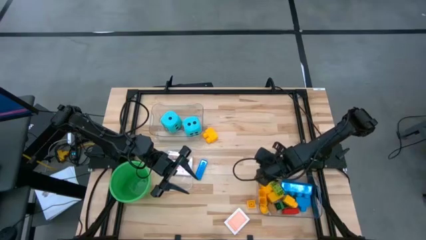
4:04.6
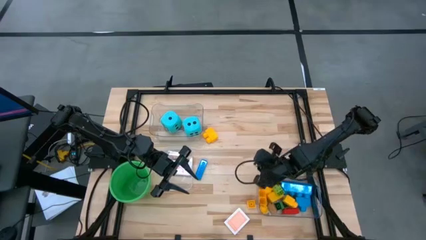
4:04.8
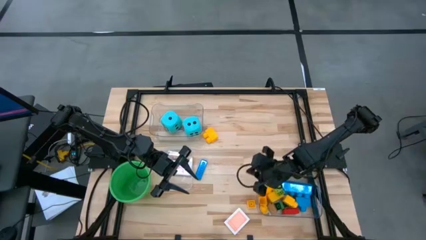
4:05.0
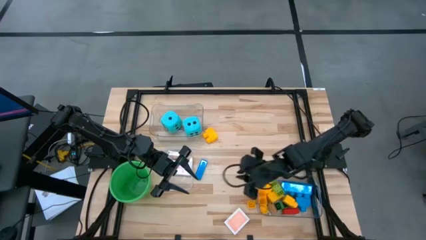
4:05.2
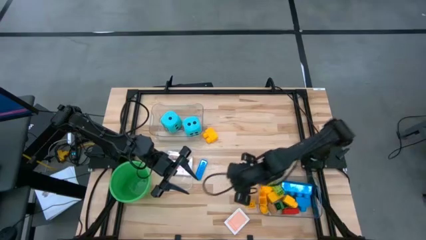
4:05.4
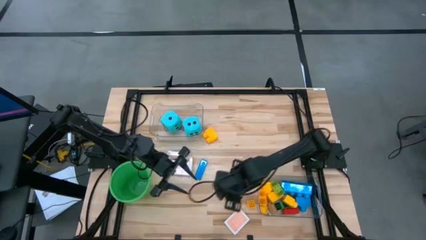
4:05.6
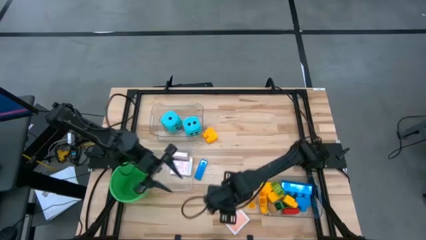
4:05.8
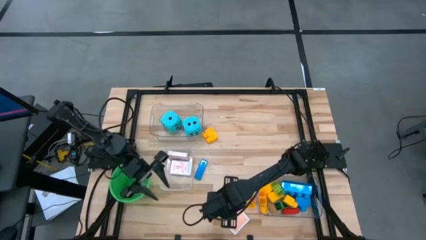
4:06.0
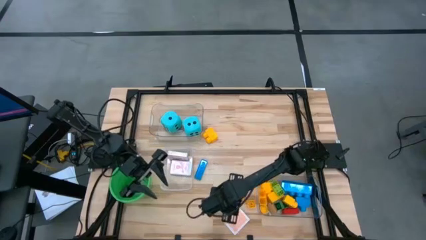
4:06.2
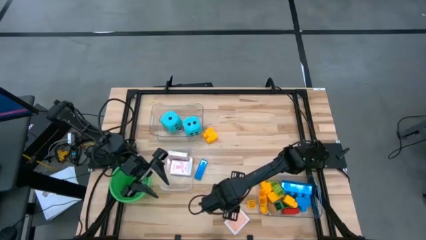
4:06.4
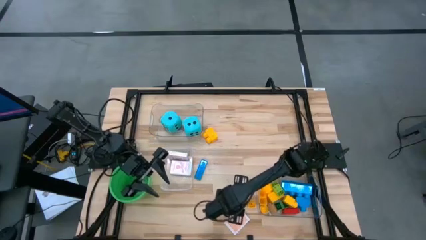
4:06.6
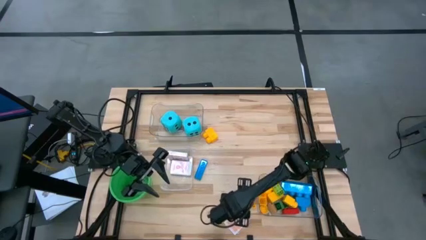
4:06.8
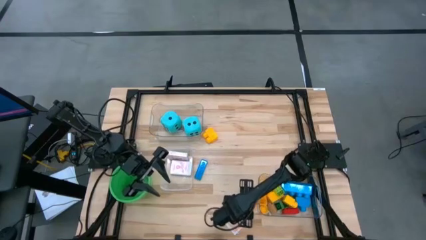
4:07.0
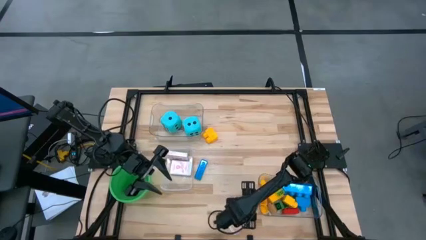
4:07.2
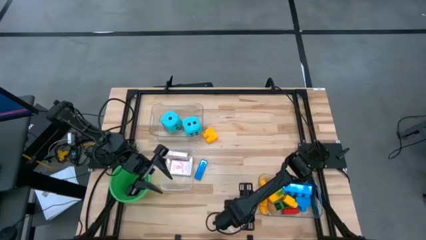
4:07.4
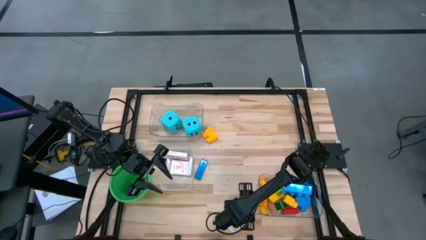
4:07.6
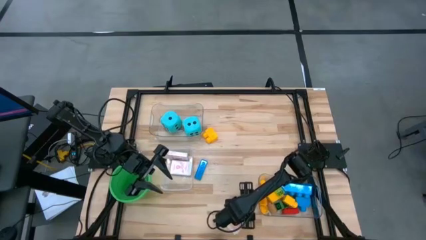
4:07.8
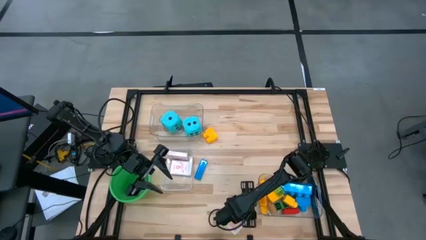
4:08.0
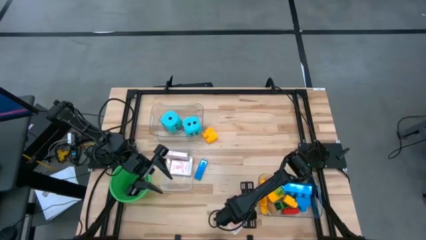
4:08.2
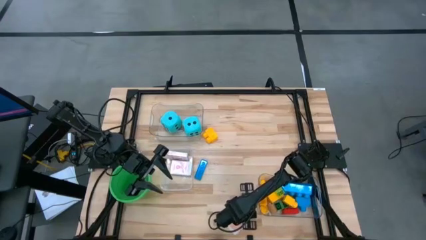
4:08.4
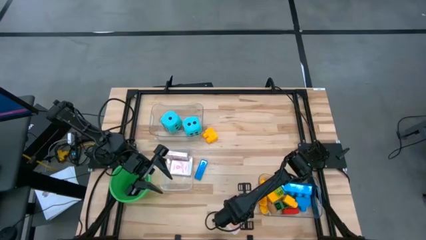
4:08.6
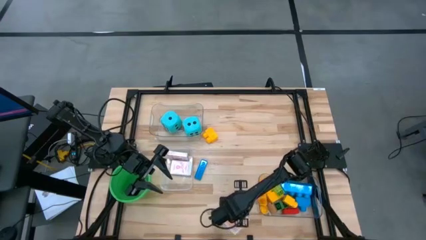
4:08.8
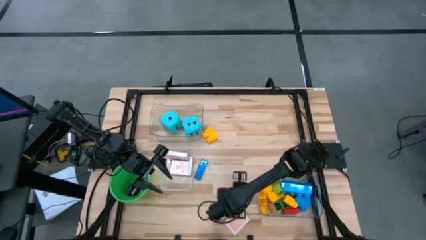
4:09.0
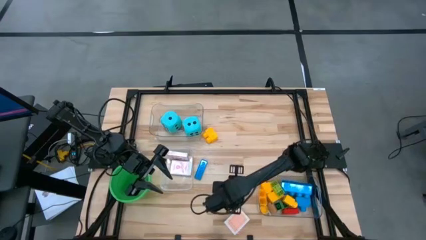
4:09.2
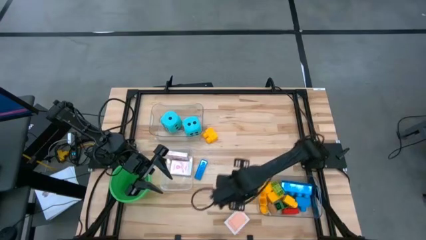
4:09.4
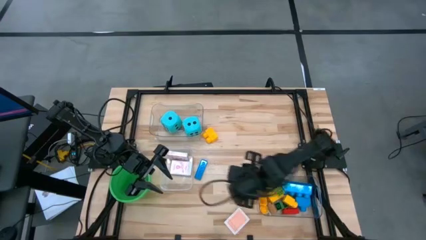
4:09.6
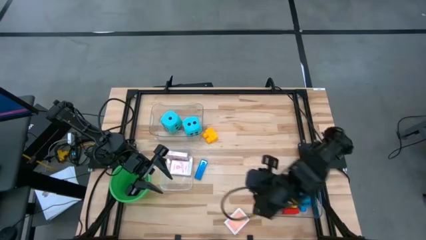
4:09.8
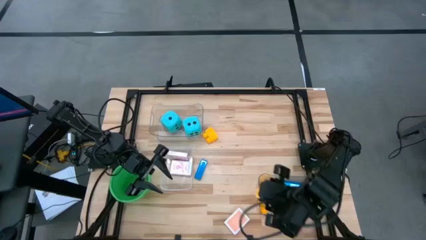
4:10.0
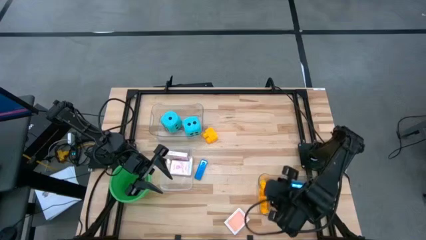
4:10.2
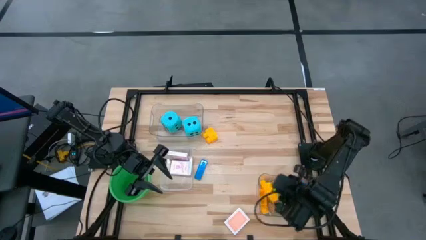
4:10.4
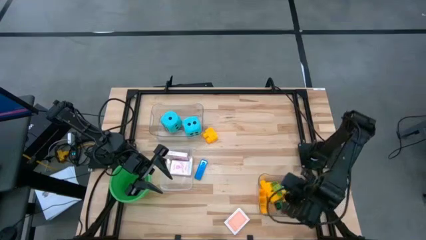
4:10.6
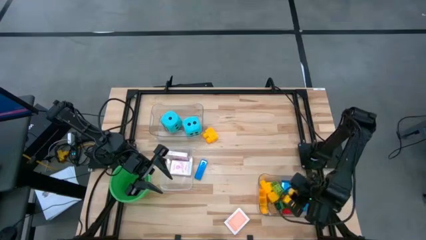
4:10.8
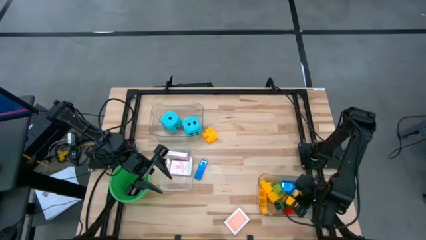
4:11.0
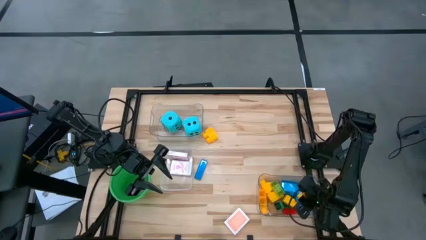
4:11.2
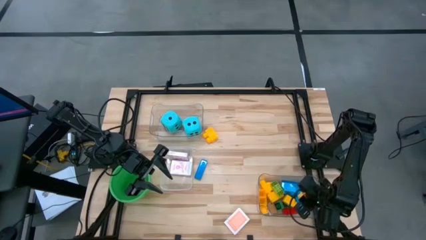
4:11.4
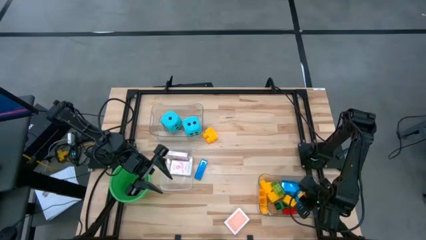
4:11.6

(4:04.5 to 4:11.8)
Task: Pick & Place Toys
Put the yellow game piece into the bottom right transparent bin

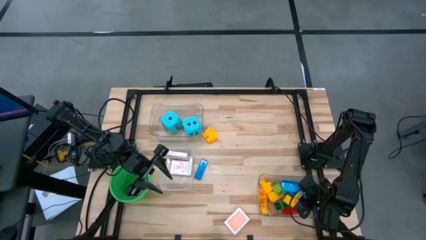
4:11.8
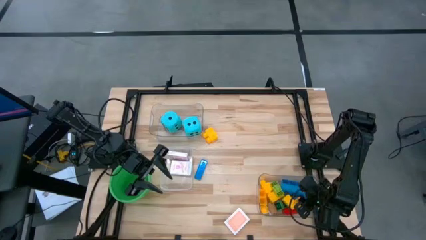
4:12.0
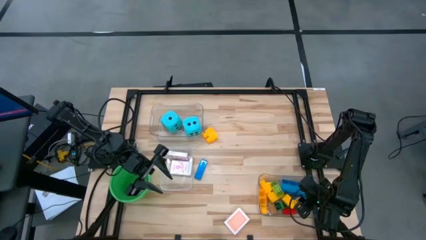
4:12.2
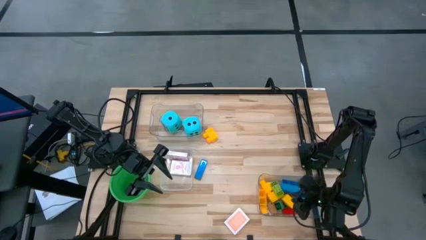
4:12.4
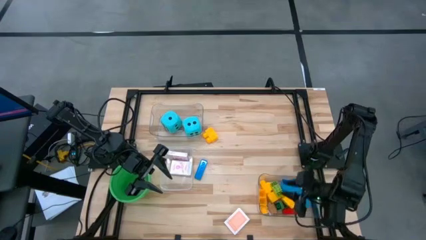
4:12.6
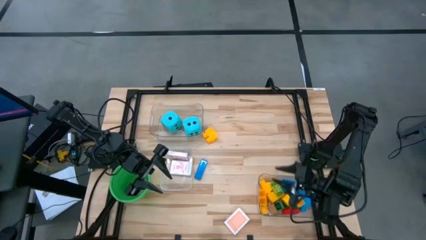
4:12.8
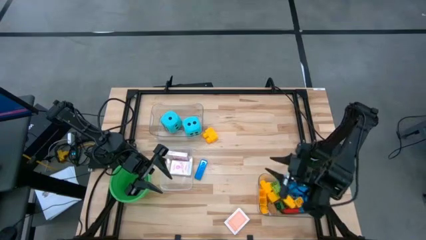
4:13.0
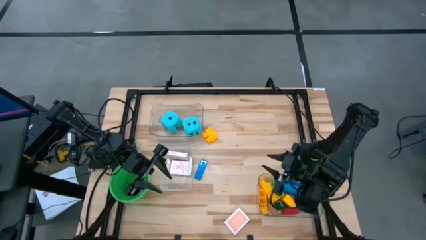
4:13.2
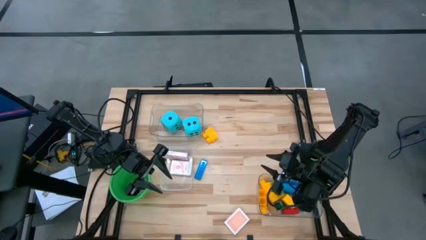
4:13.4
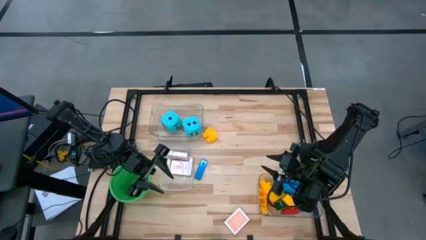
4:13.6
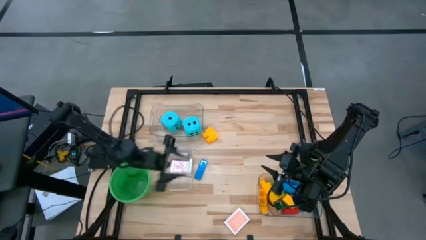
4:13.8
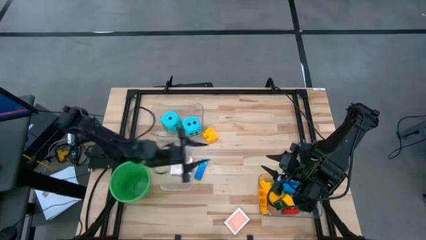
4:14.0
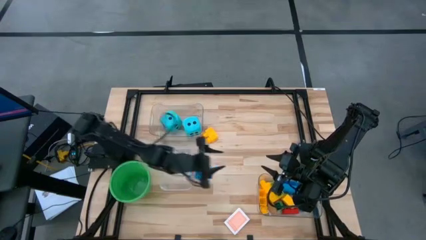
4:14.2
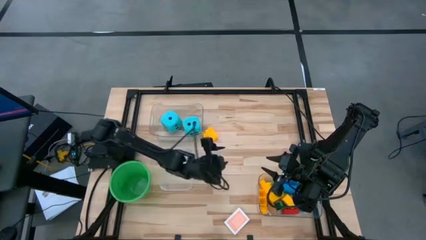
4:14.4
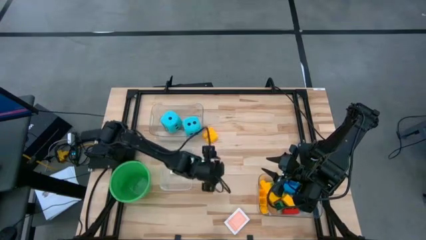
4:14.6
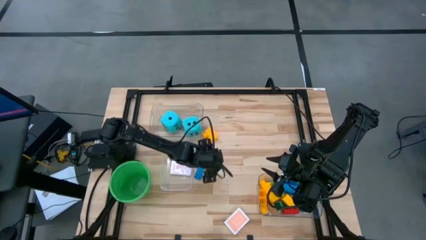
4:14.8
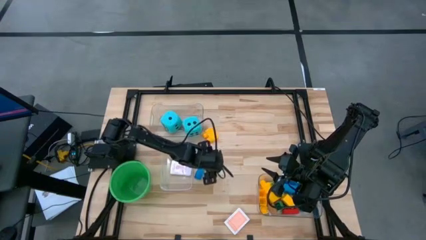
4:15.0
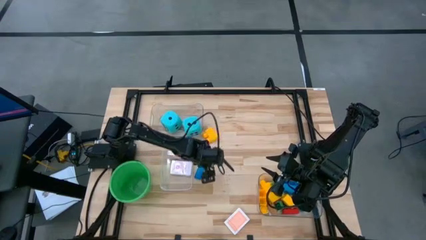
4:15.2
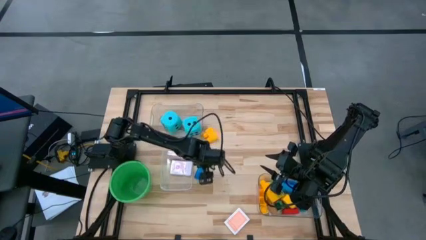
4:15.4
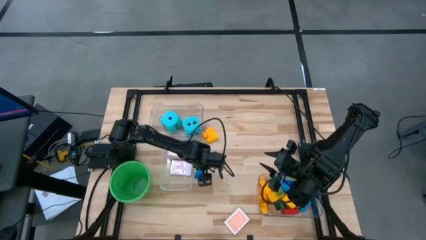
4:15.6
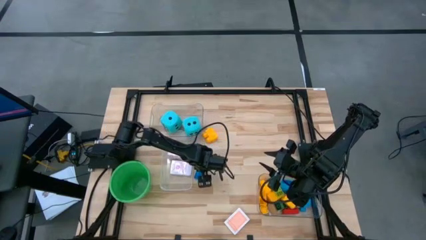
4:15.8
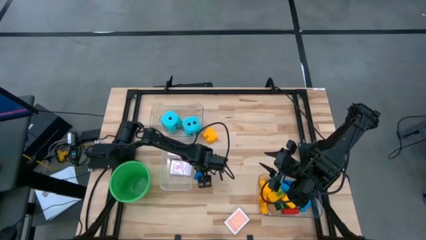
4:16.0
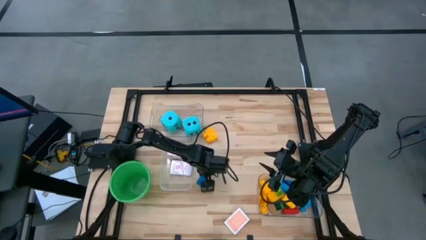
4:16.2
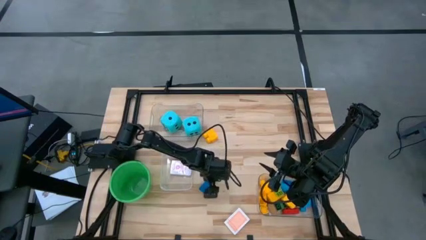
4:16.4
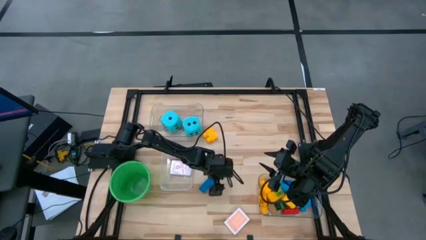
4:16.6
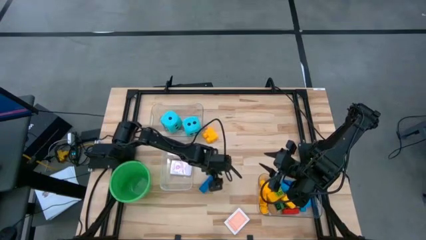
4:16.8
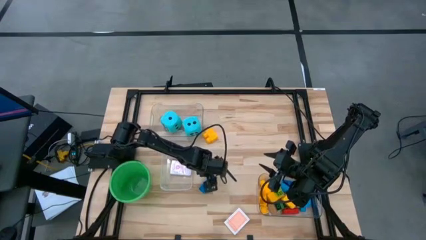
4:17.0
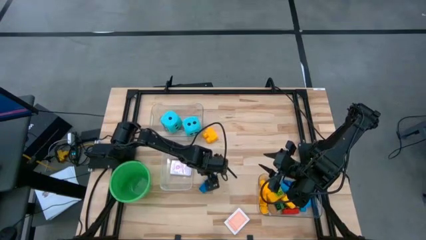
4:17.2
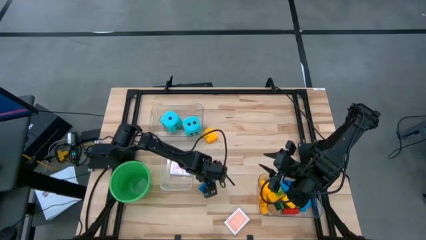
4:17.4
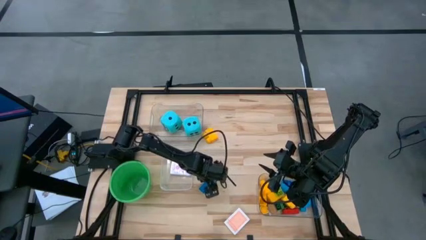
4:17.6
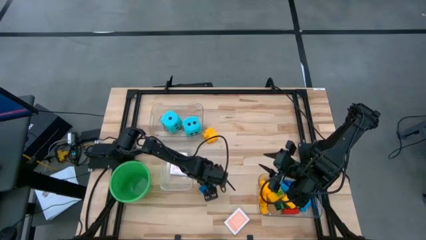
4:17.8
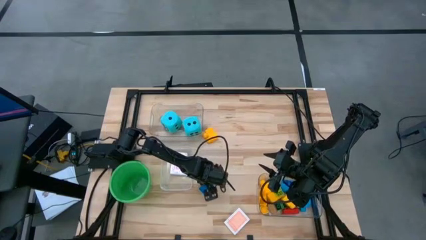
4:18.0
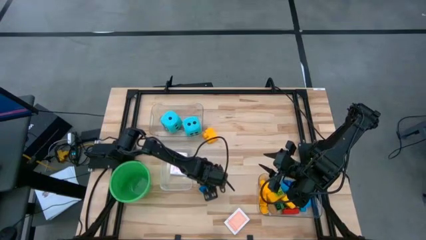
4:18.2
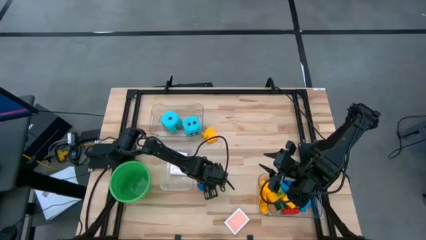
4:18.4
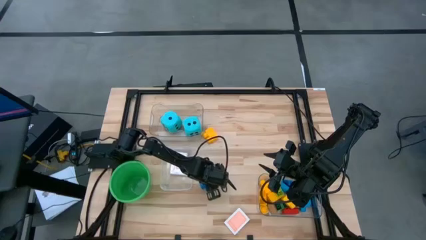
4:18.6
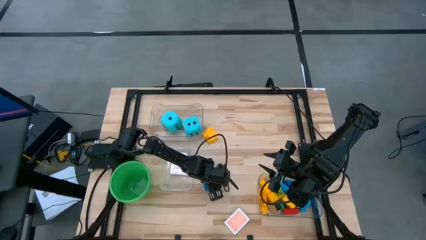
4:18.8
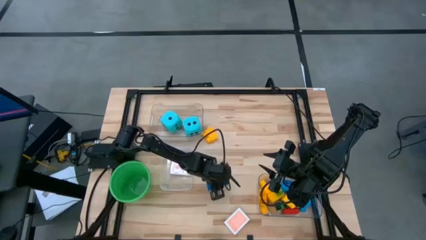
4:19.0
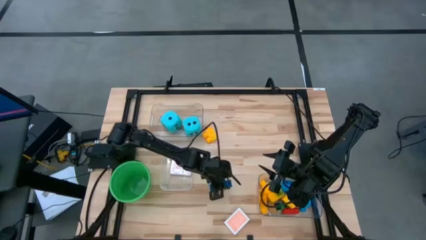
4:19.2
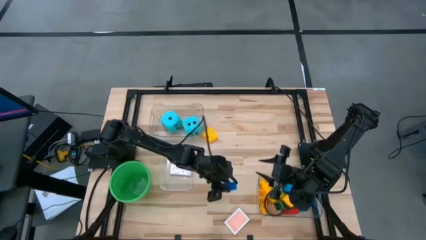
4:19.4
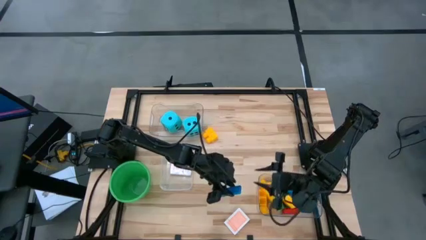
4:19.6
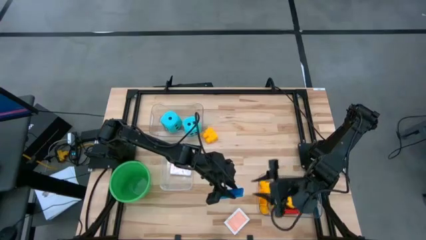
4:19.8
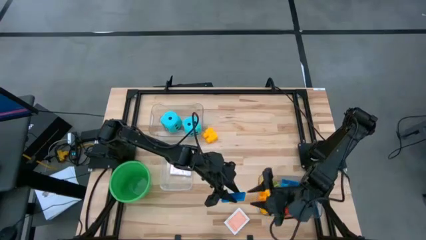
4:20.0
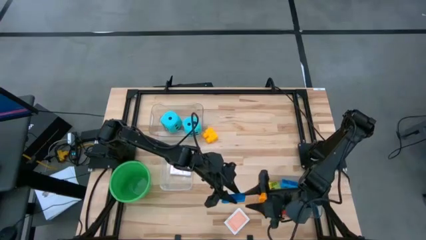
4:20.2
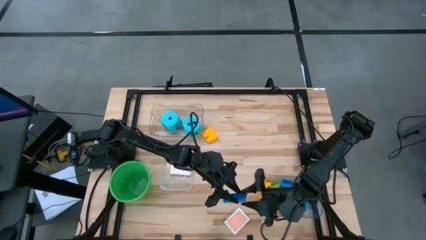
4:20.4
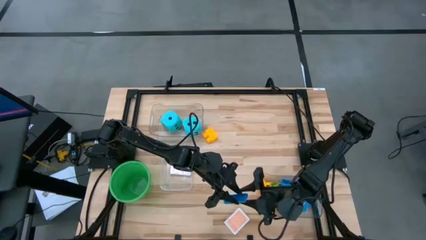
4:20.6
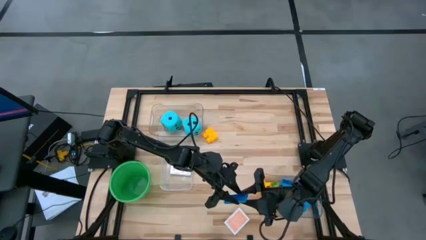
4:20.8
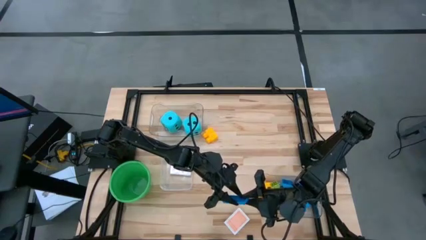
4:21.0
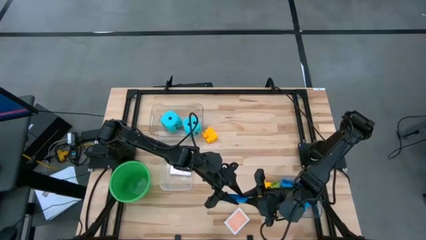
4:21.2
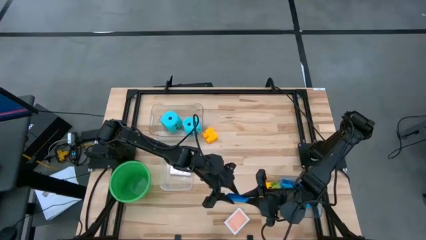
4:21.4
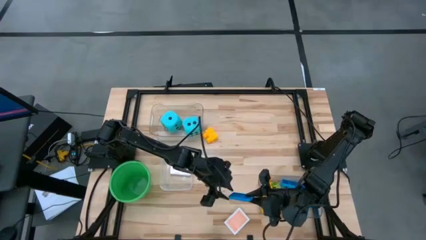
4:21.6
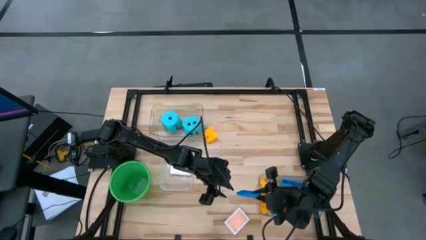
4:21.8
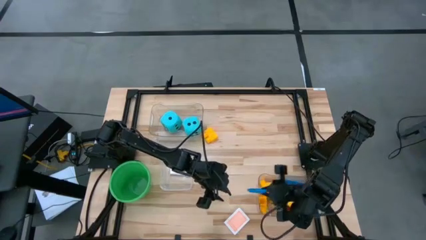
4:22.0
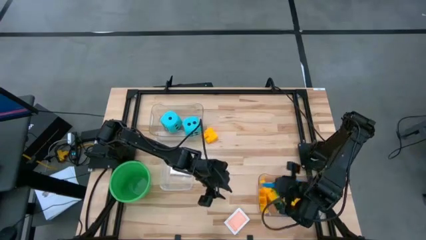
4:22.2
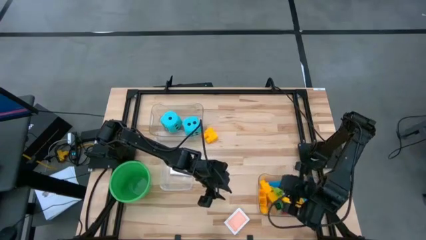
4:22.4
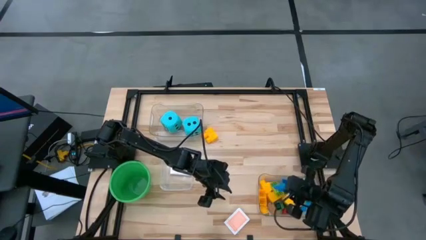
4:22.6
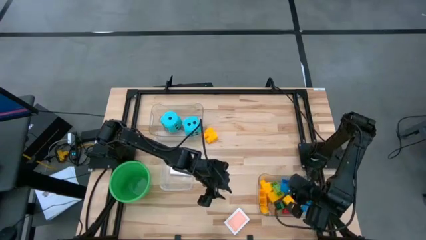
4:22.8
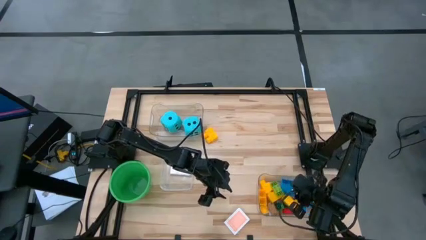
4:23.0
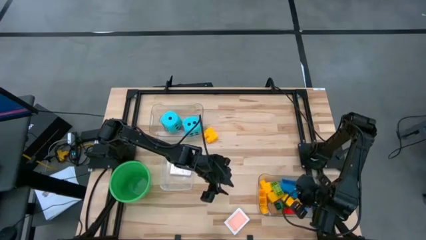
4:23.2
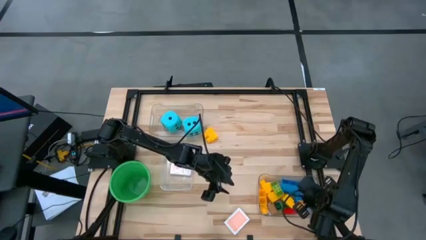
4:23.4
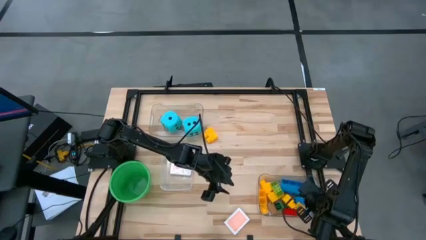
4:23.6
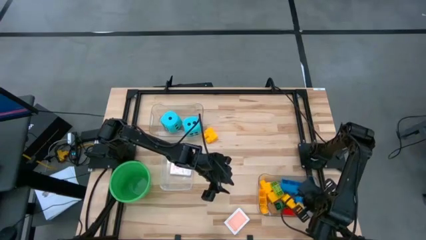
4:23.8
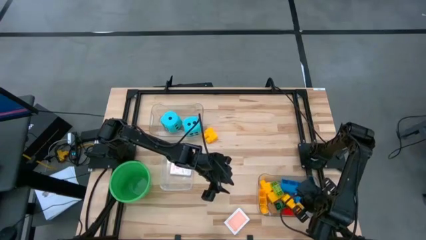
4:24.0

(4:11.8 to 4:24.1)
Put the blue game piece into the bottom right transparent bin
